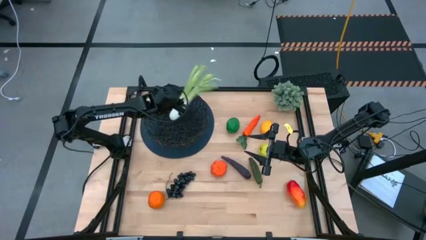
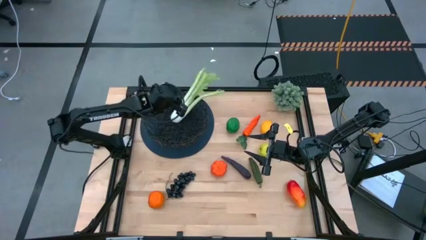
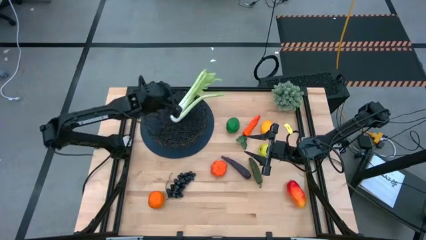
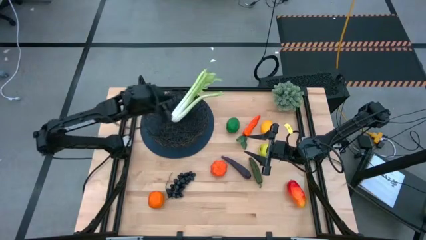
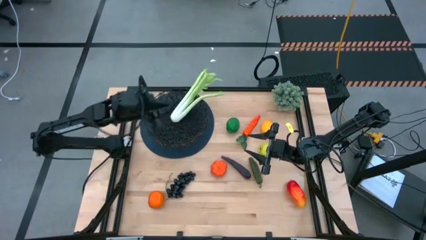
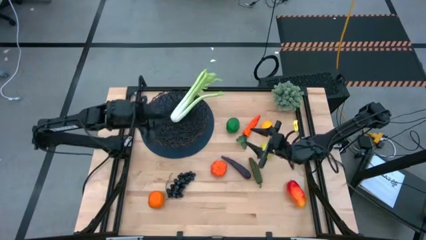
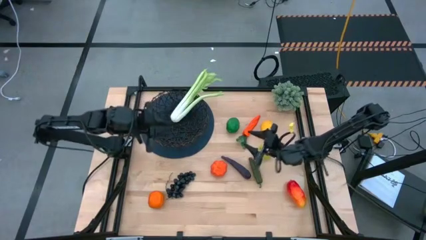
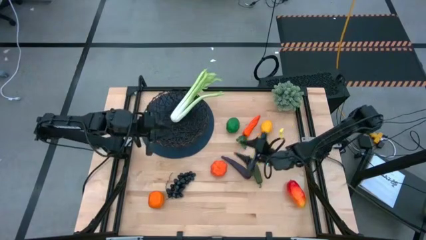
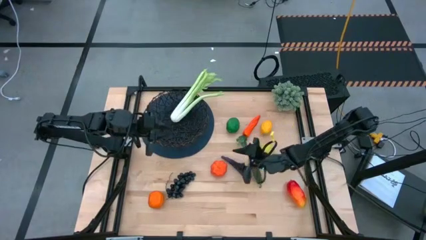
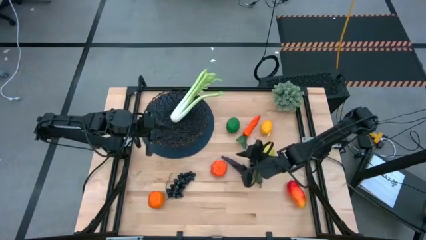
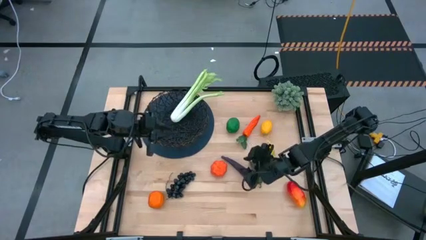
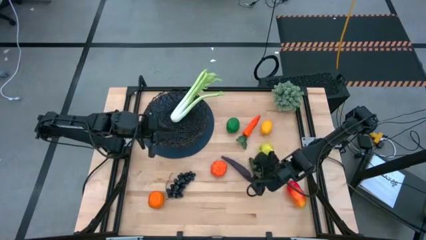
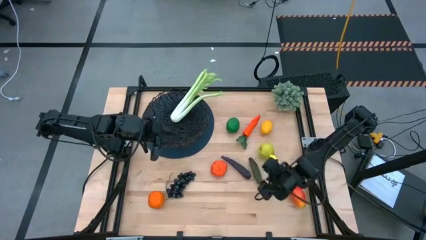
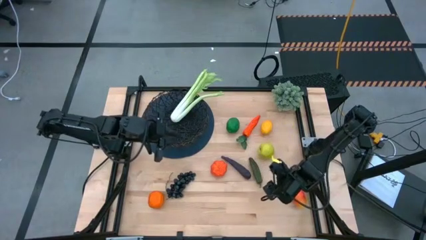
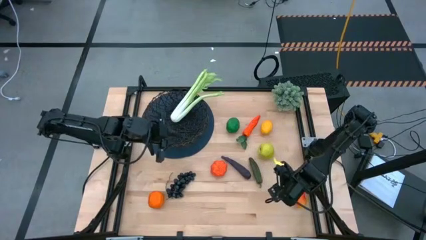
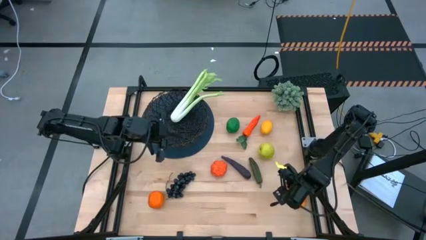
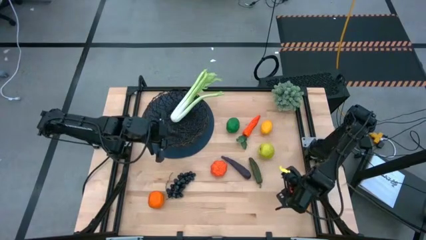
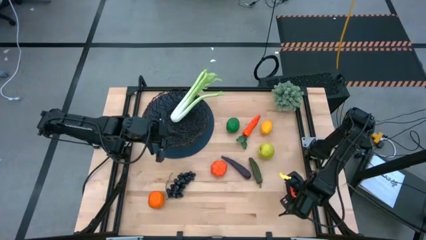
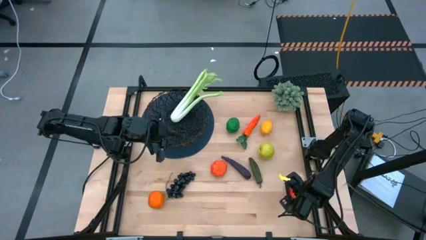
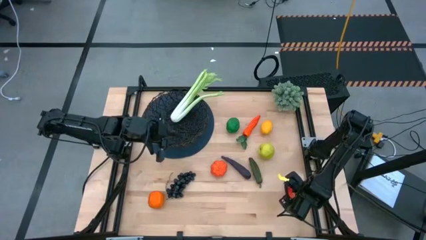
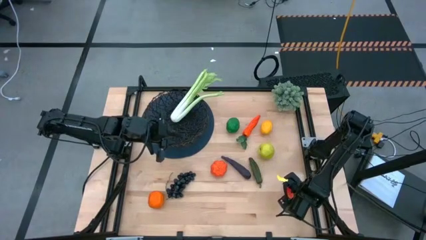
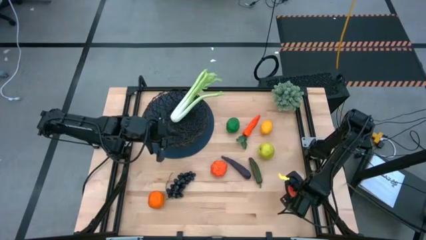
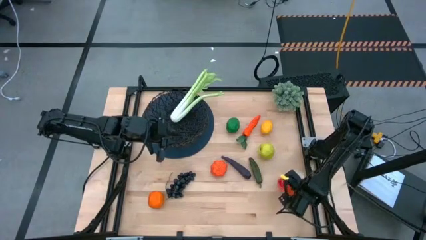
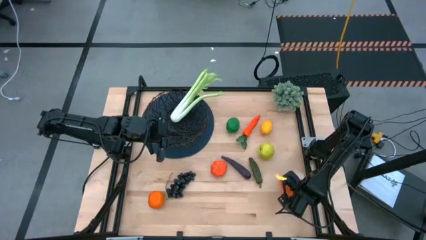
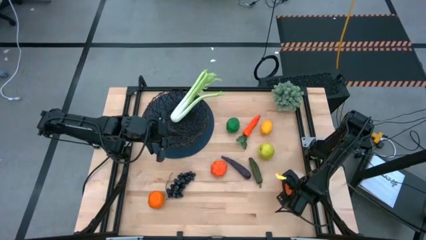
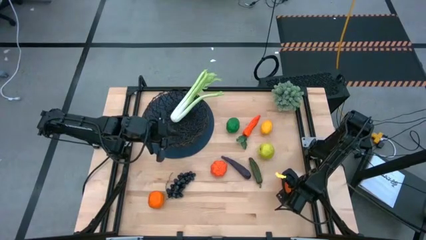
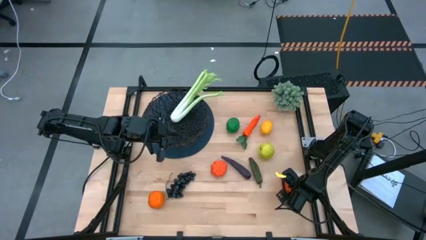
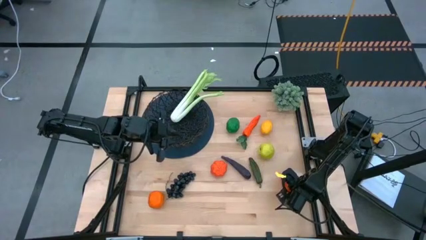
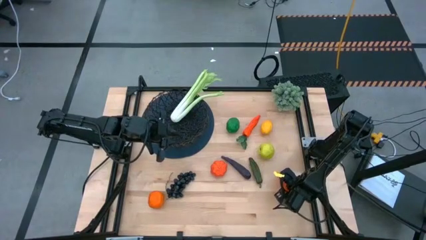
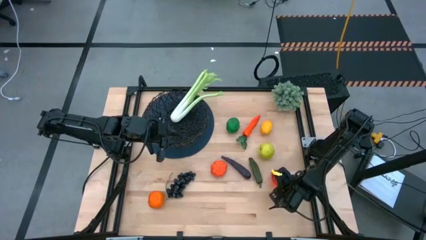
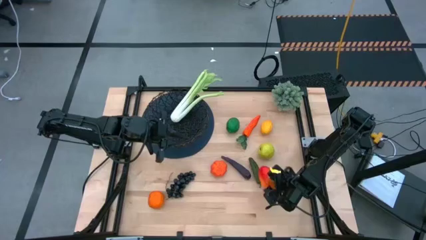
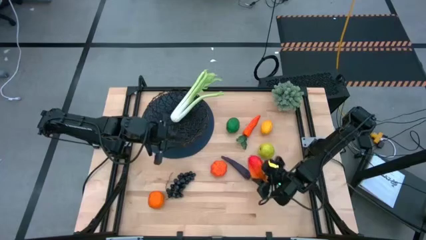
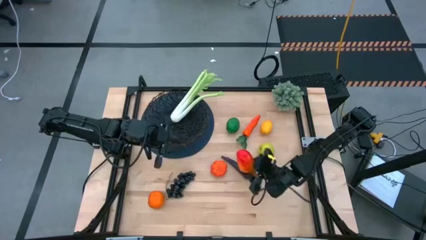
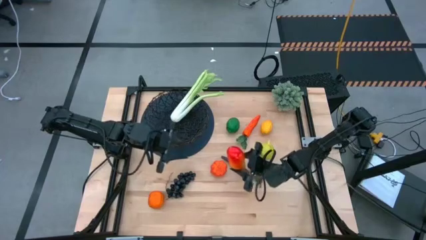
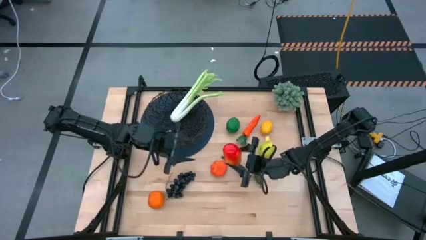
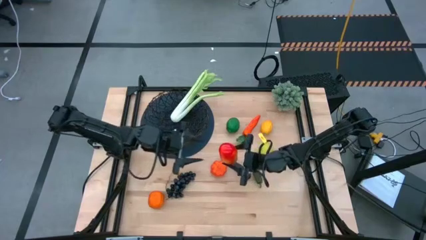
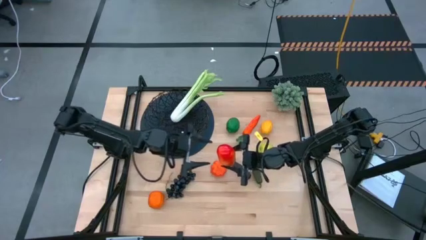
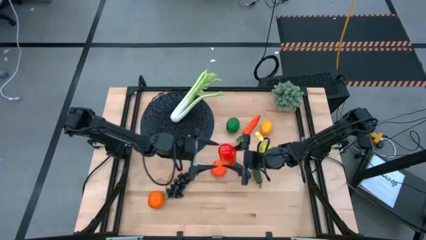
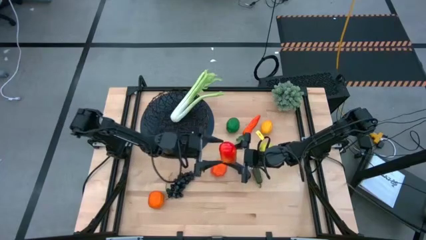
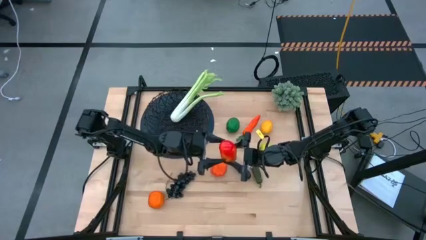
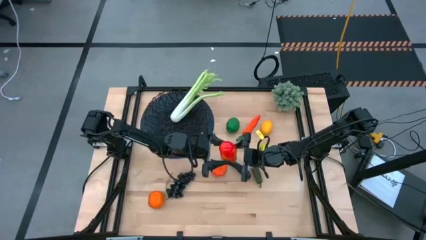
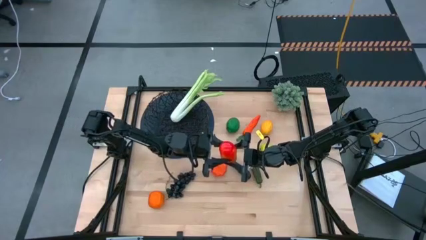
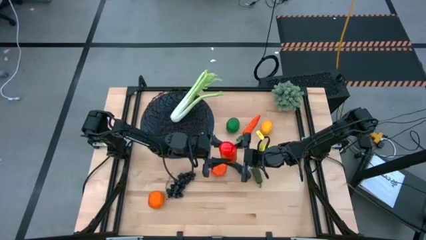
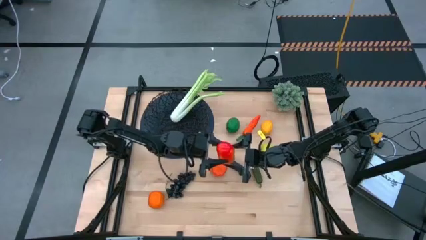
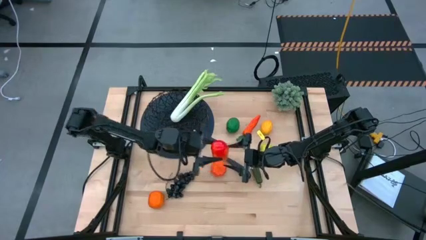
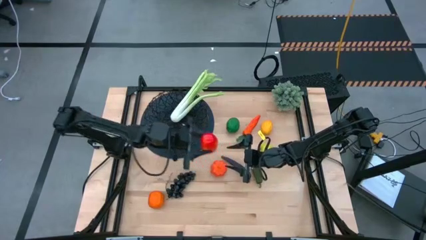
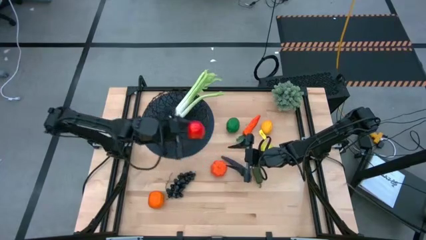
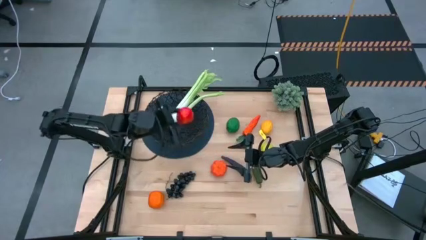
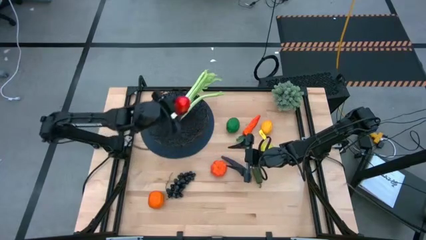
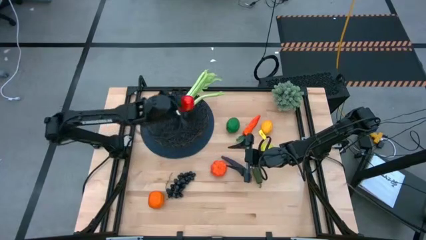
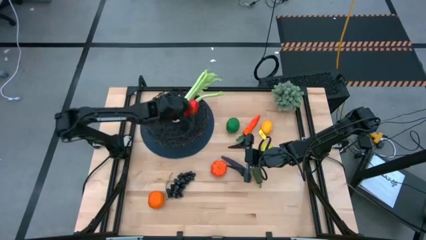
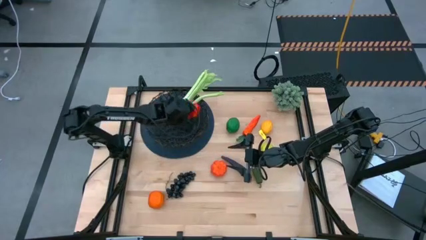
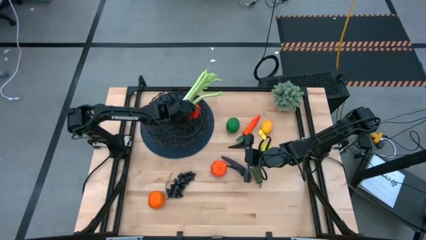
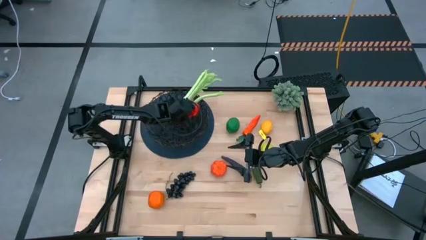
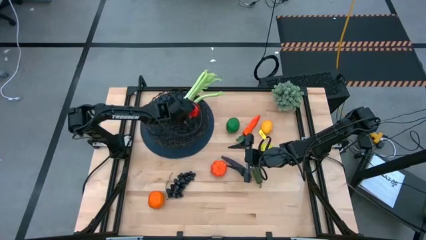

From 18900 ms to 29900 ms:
Task: Build produce basket
Put the red mango into the black basket

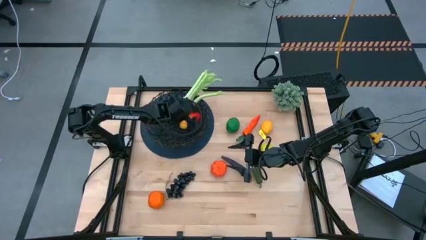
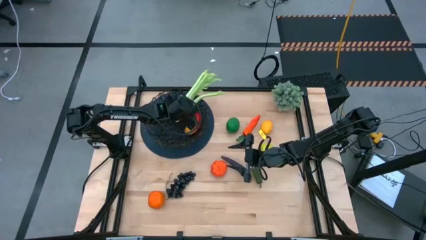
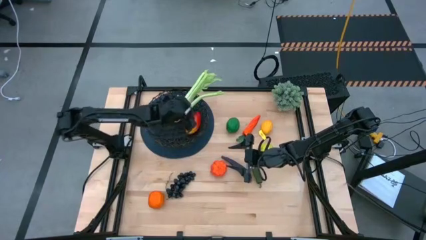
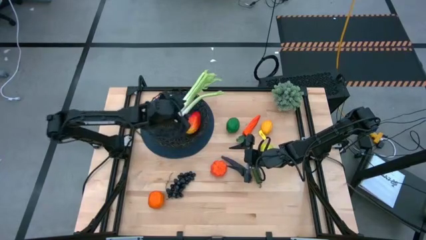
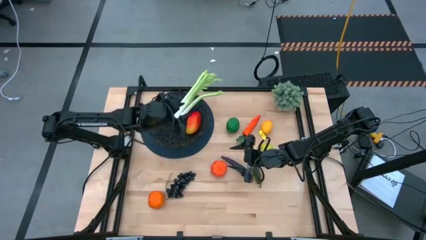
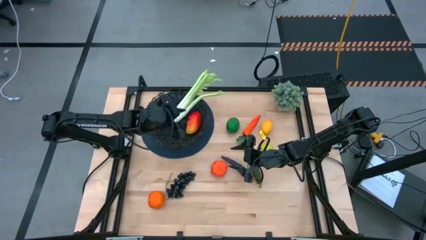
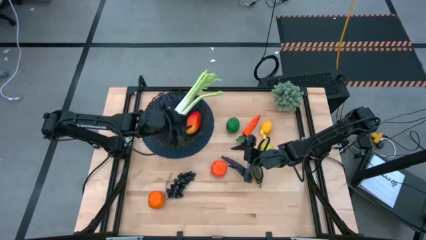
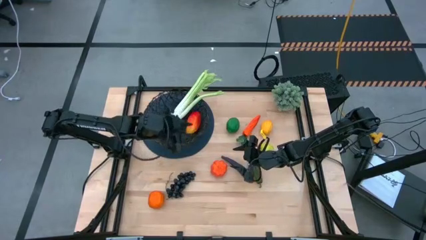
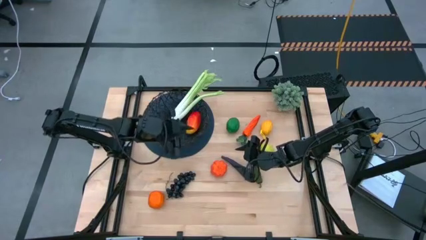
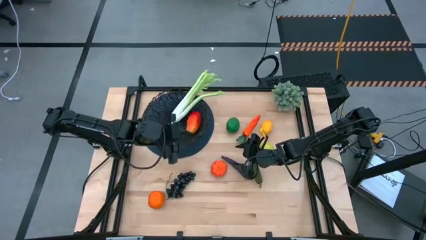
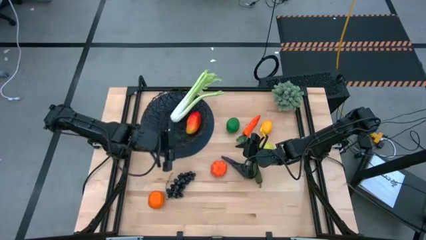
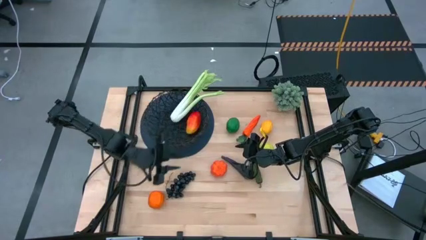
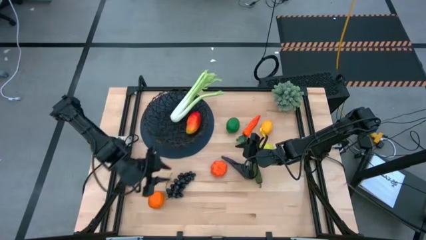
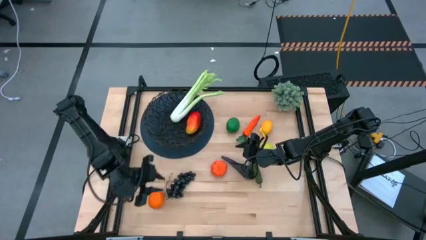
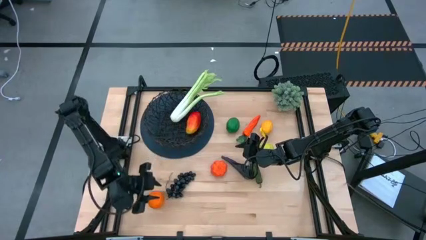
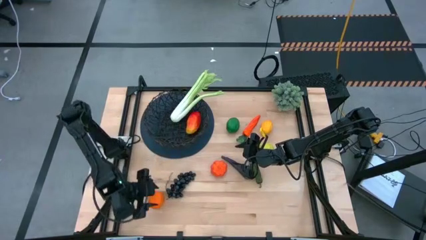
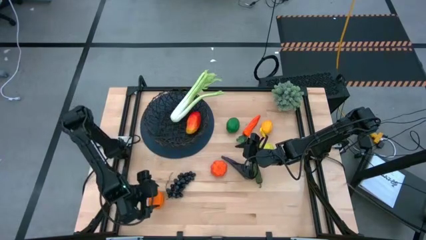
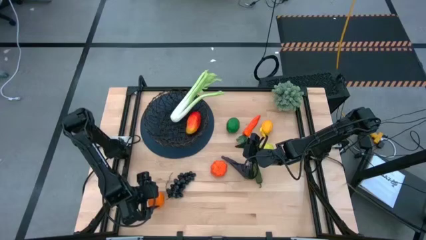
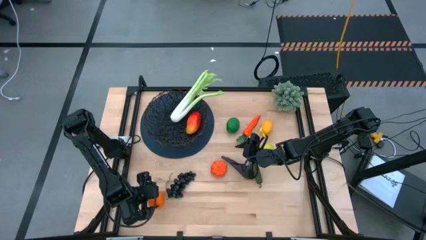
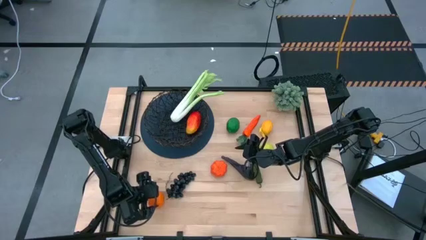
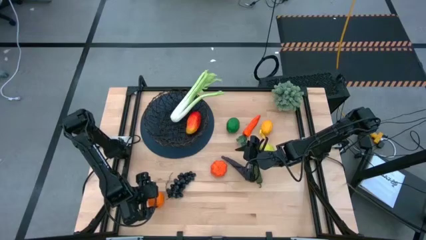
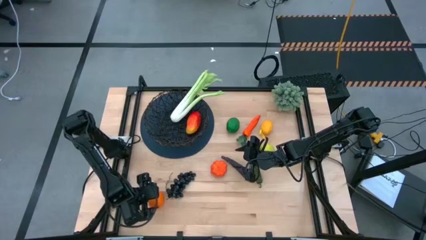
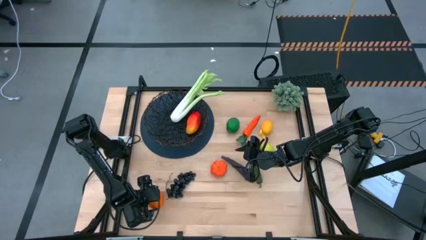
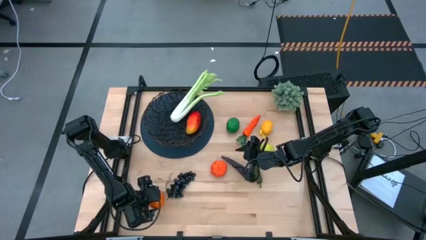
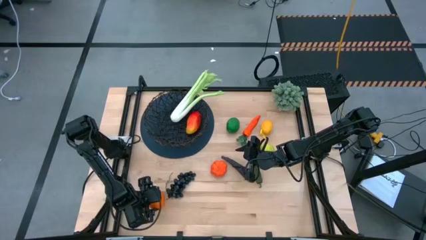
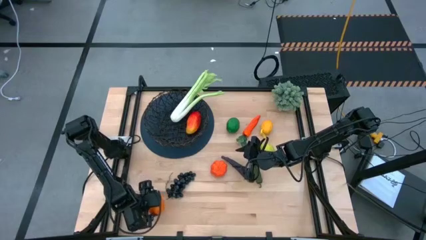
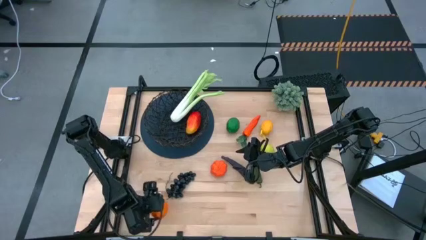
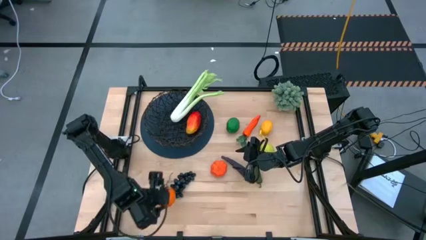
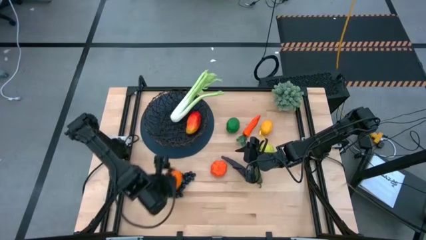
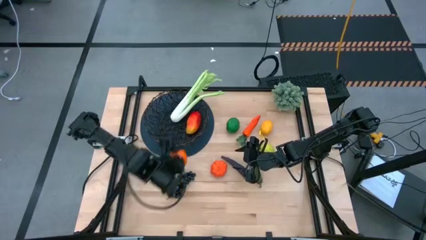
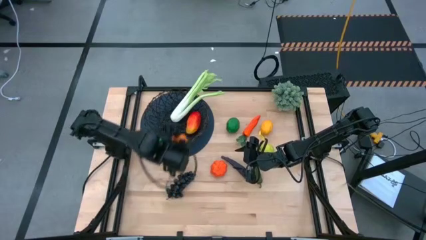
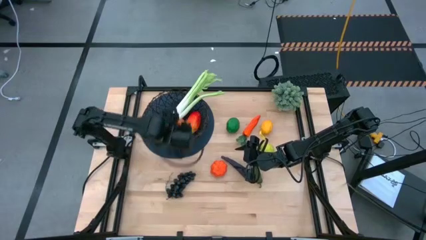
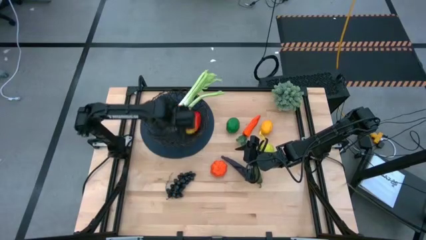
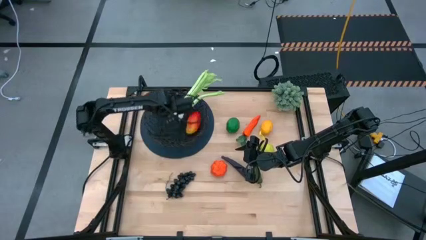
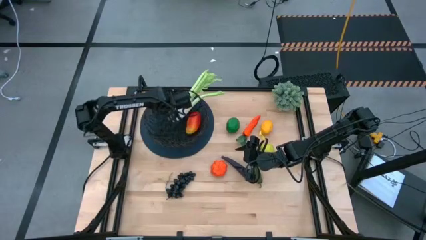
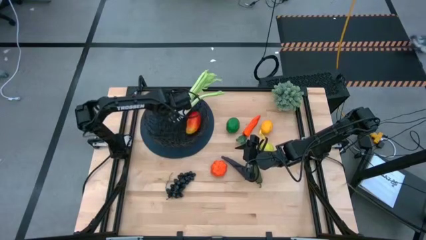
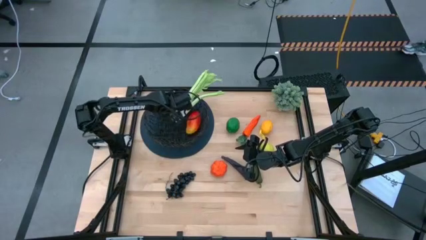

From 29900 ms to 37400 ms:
Put the orange into the black basket
